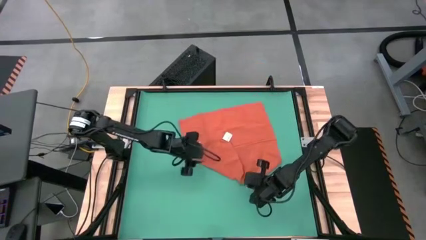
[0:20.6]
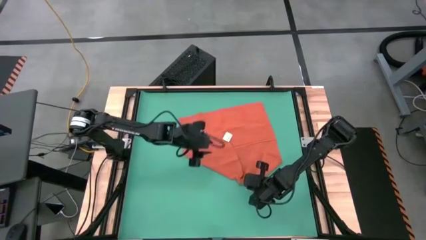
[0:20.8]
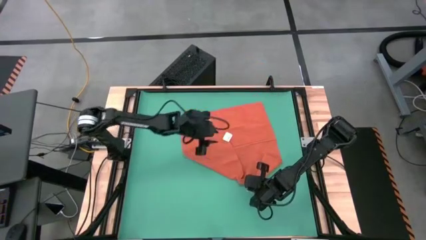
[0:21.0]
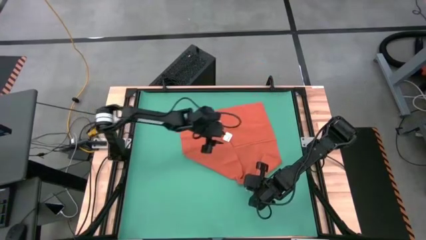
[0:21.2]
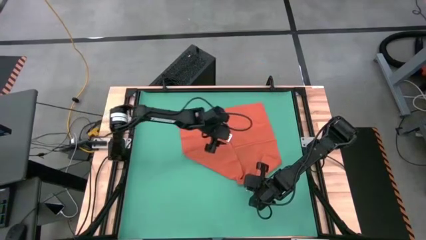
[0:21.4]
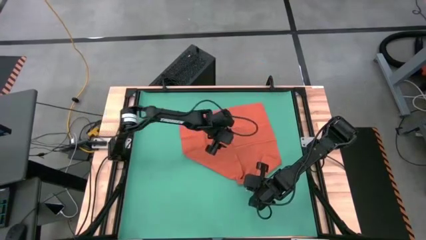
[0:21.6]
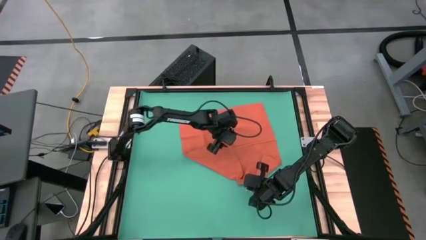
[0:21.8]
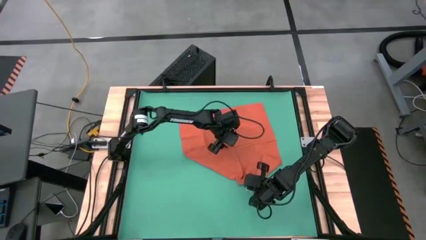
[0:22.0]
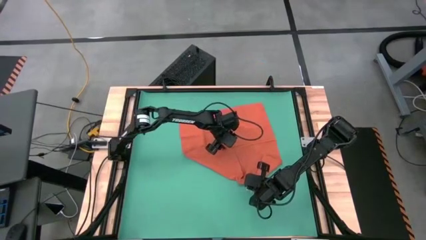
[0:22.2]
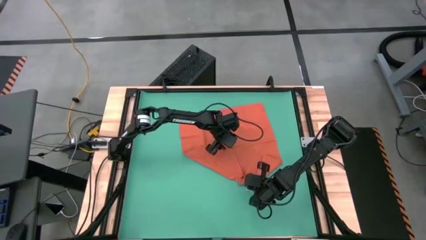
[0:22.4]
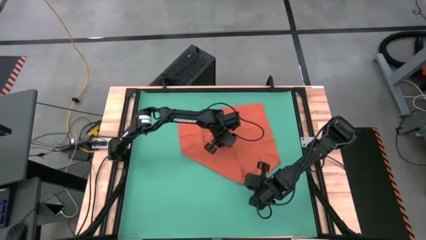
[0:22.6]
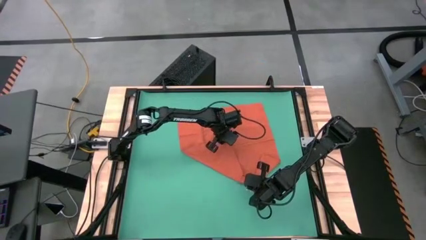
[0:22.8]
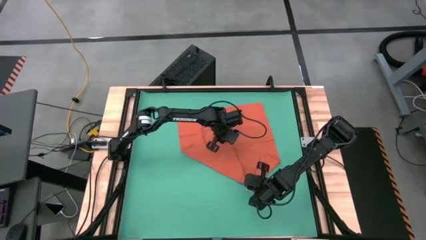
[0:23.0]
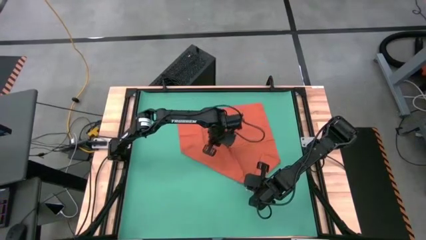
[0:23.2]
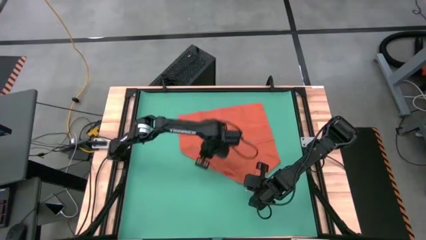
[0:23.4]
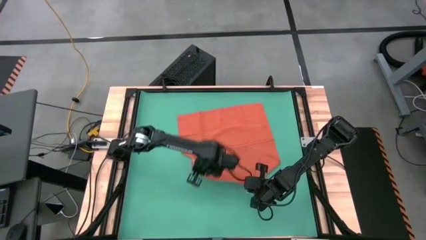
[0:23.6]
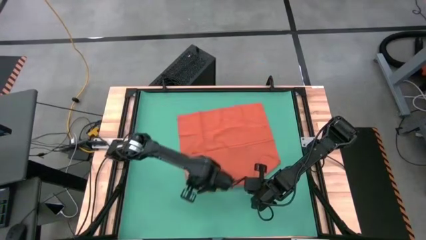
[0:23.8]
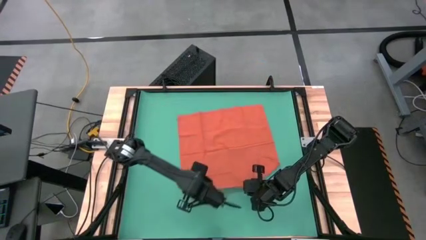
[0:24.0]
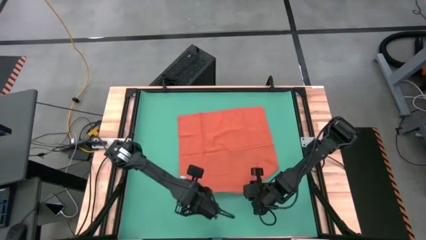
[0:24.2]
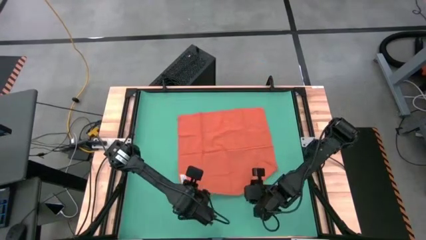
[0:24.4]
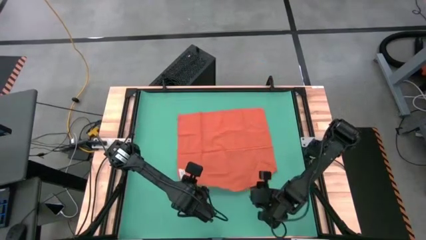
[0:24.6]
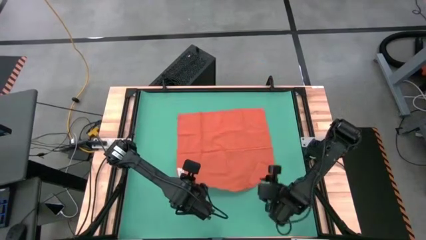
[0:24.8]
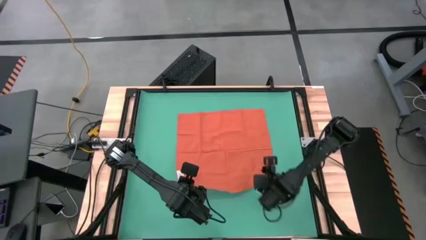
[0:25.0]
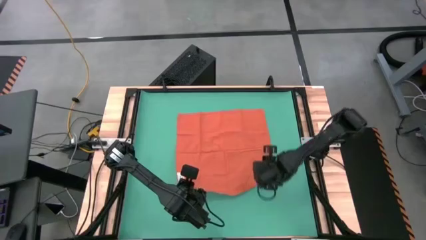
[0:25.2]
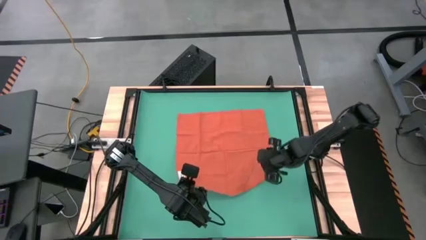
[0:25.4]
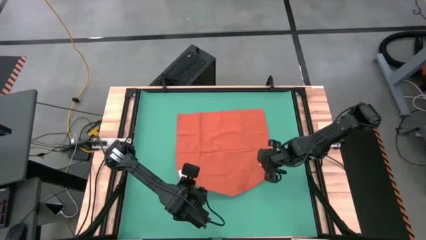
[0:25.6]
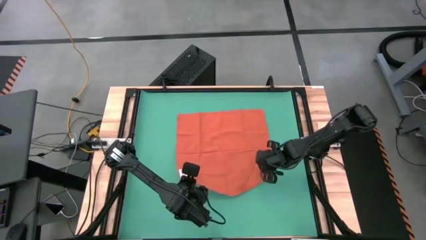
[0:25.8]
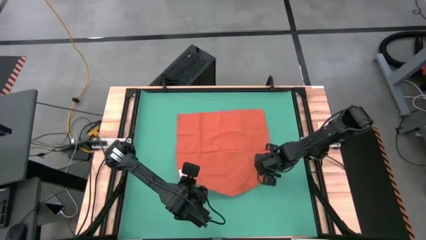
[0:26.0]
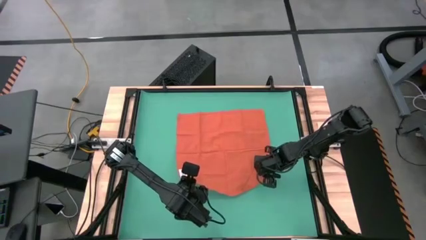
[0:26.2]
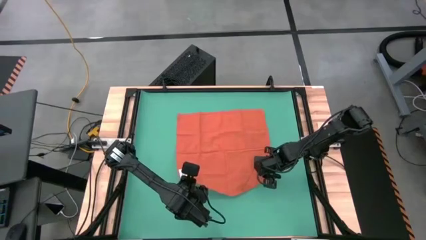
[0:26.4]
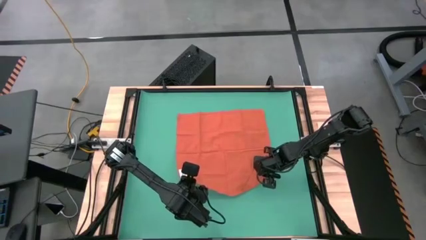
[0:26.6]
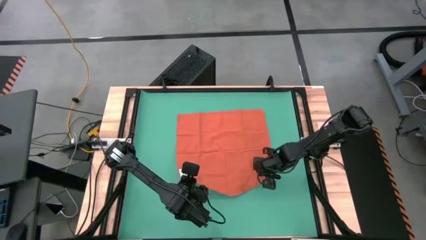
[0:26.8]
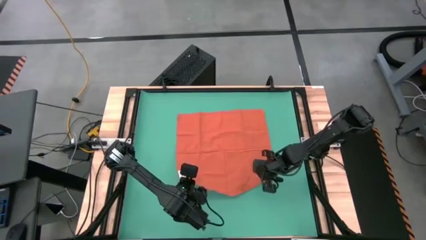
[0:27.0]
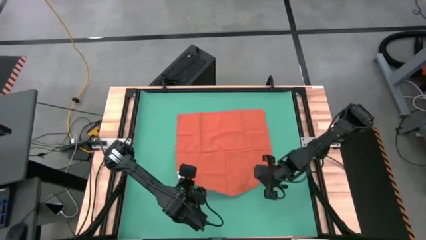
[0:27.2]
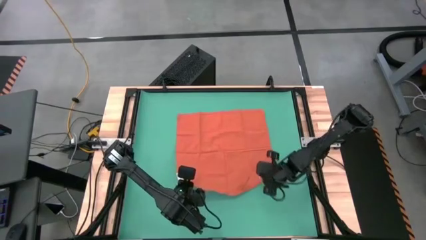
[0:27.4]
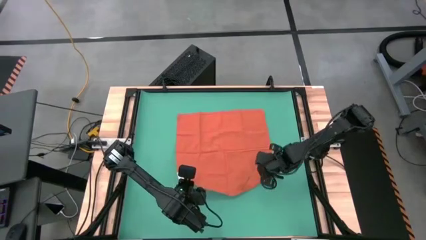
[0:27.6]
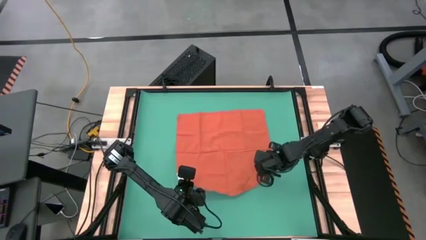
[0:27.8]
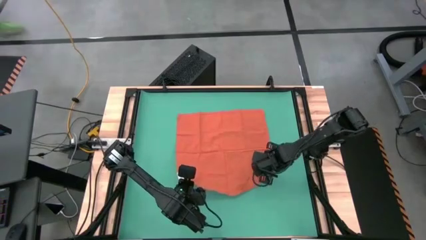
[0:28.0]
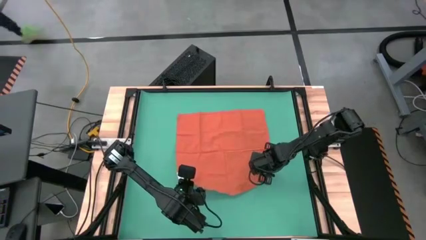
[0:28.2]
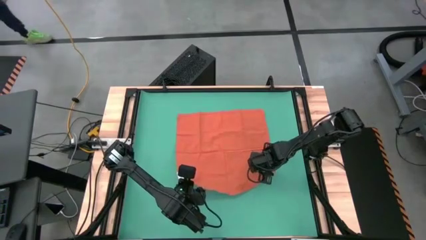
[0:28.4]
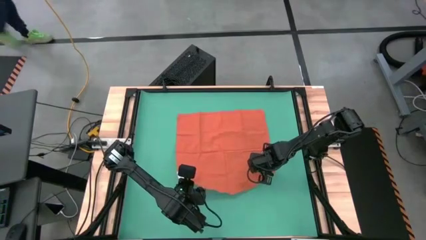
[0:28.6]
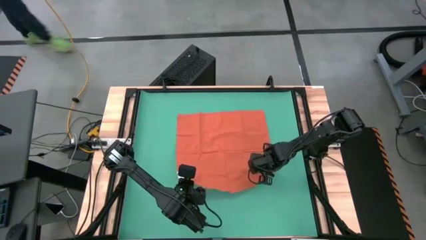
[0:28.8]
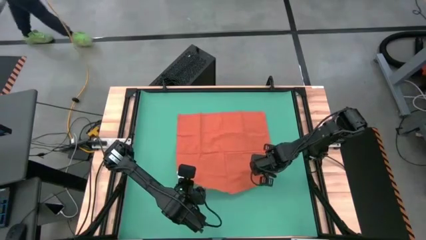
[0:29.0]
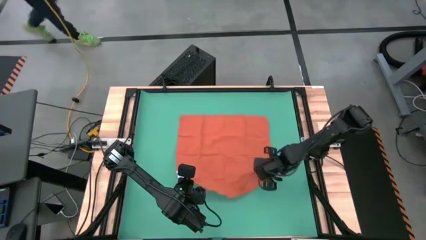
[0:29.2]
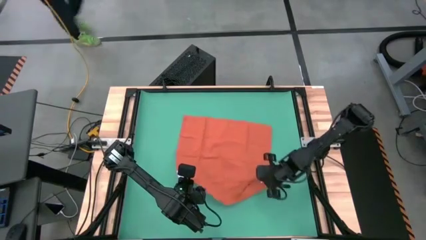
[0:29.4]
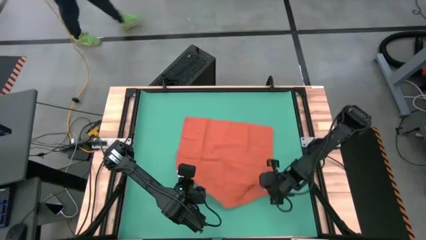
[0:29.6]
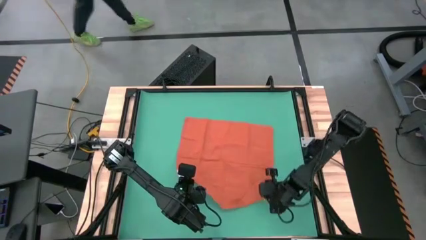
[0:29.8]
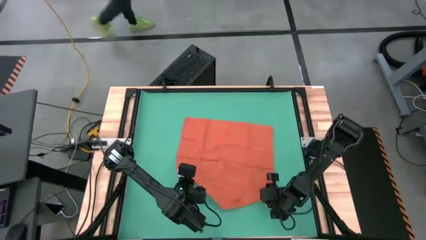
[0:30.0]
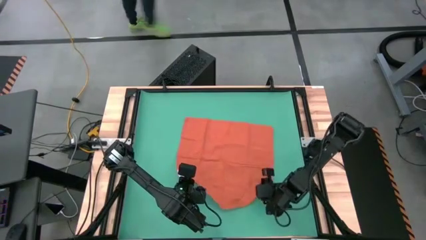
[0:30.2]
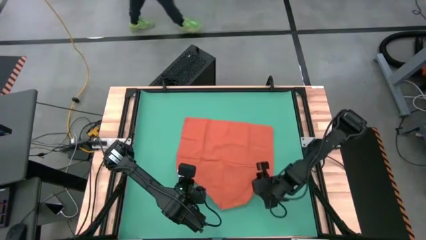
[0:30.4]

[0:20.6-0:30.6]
Task: Roll towel
Roll the orange microfiber towel
